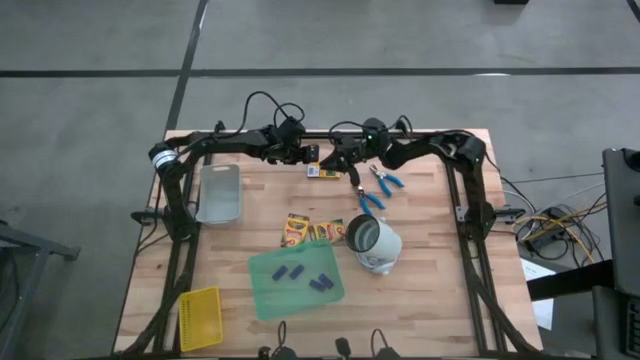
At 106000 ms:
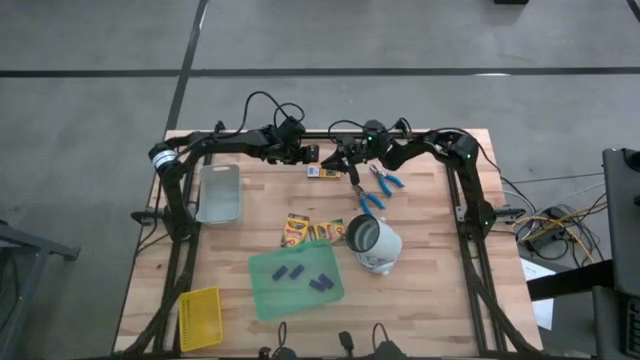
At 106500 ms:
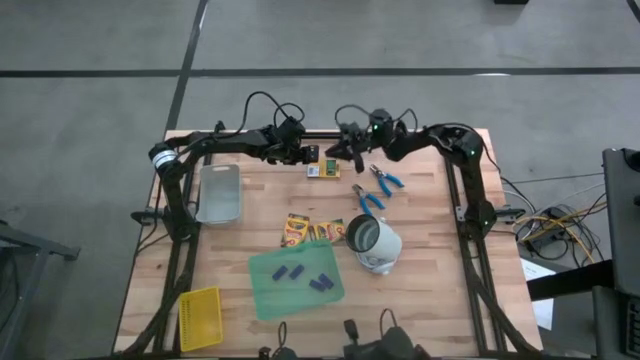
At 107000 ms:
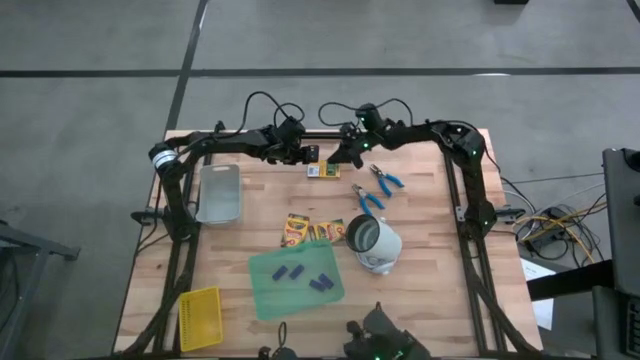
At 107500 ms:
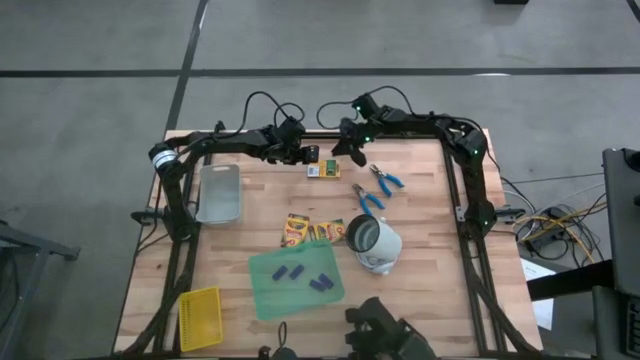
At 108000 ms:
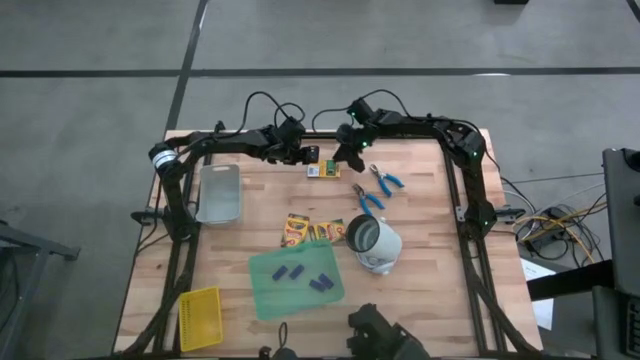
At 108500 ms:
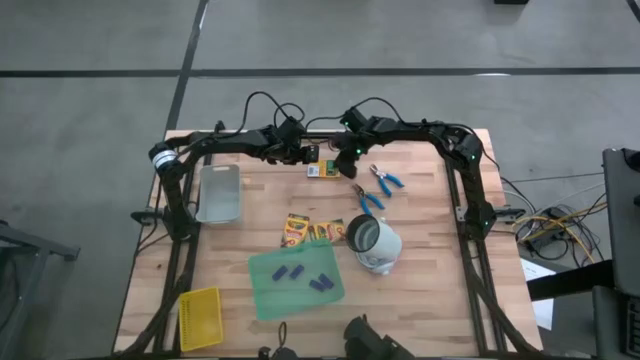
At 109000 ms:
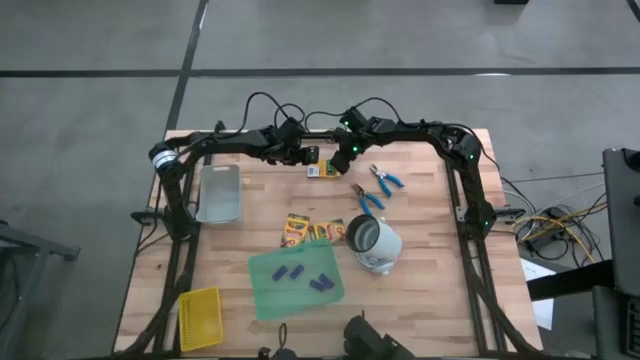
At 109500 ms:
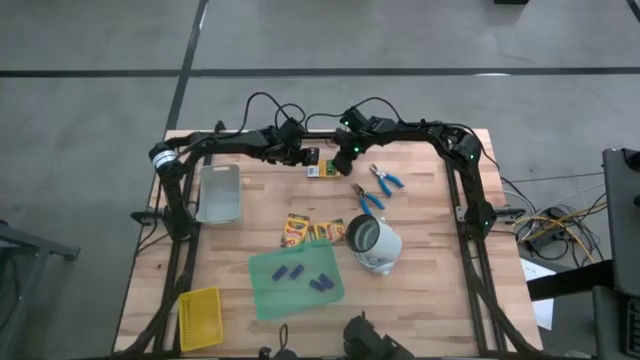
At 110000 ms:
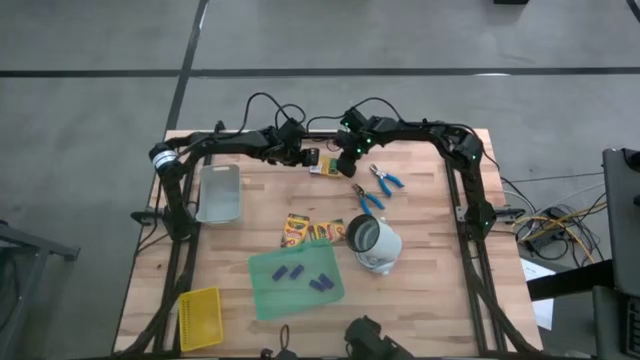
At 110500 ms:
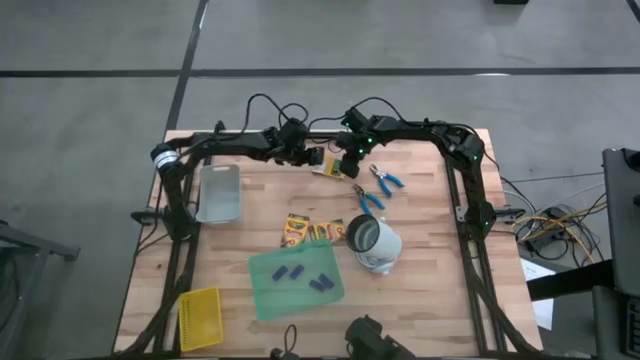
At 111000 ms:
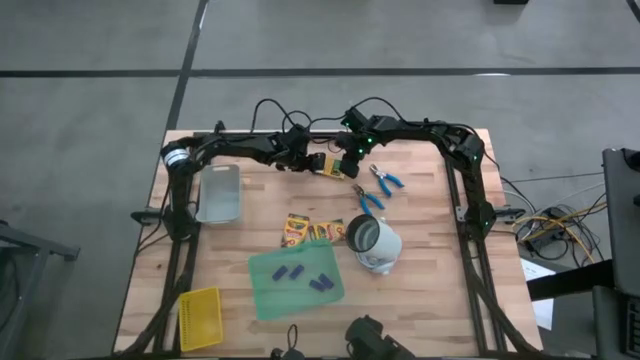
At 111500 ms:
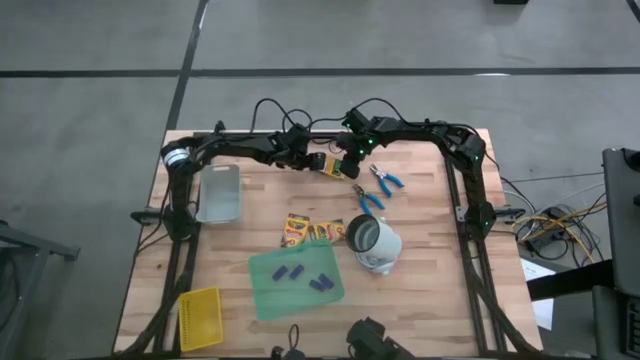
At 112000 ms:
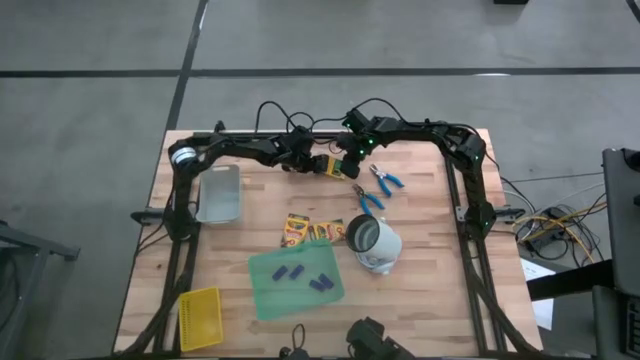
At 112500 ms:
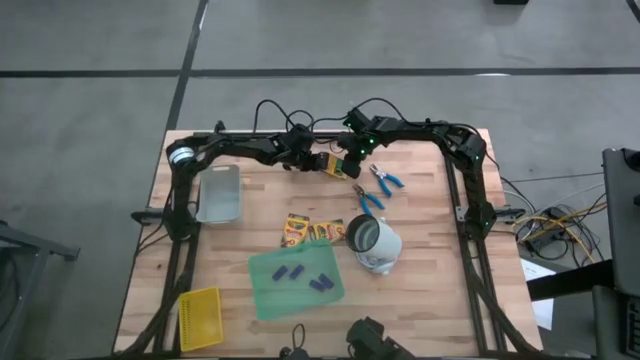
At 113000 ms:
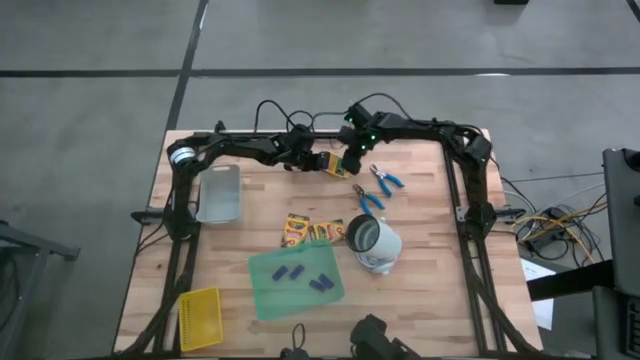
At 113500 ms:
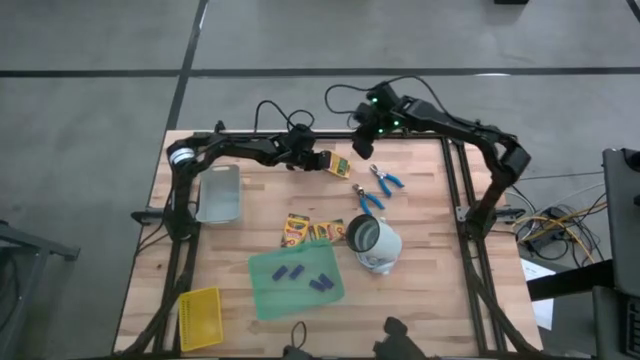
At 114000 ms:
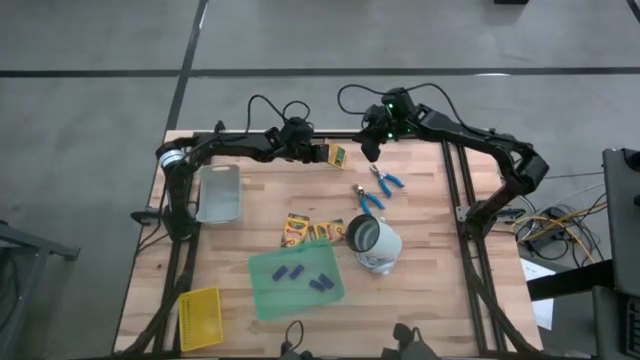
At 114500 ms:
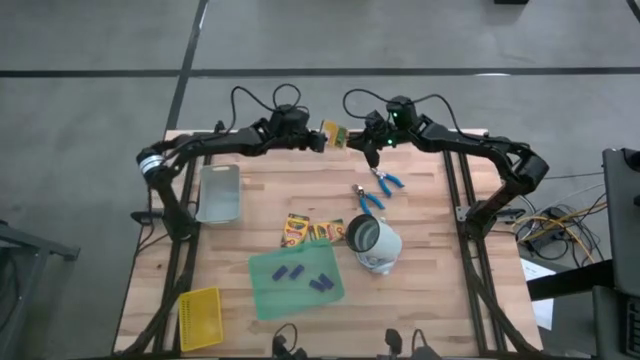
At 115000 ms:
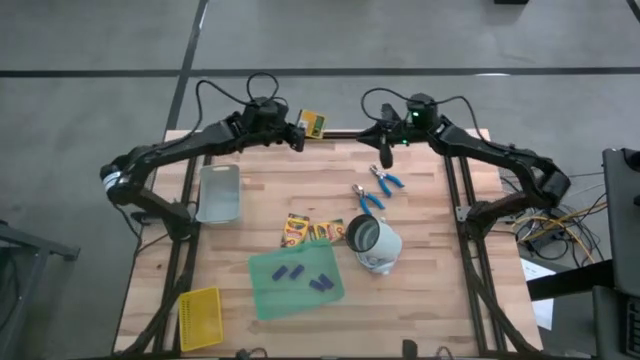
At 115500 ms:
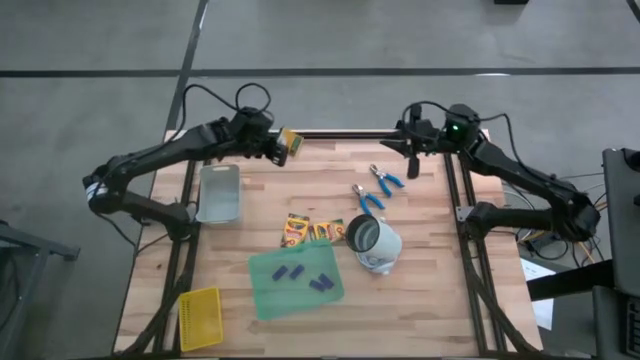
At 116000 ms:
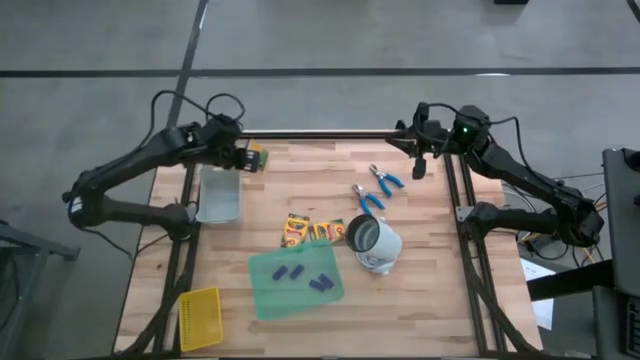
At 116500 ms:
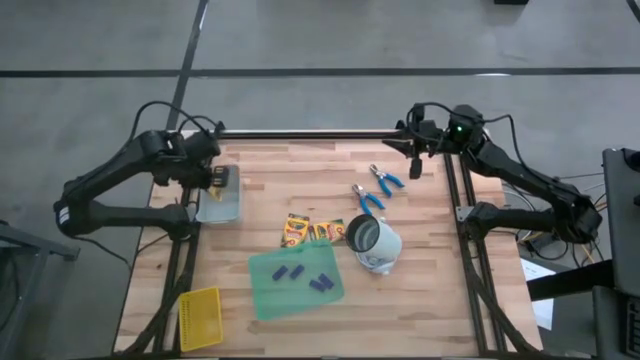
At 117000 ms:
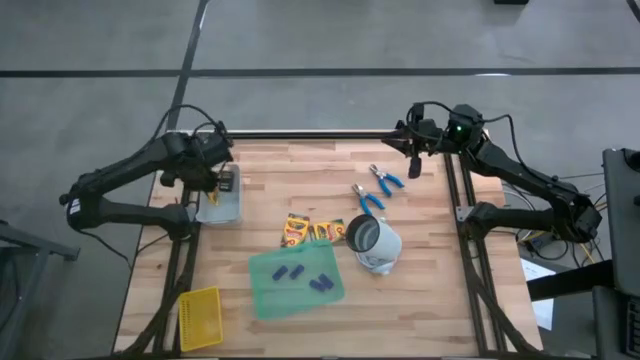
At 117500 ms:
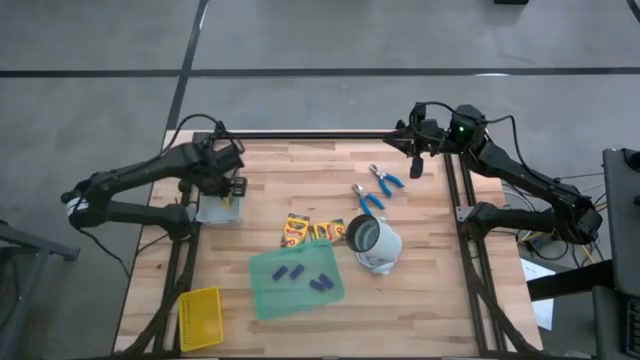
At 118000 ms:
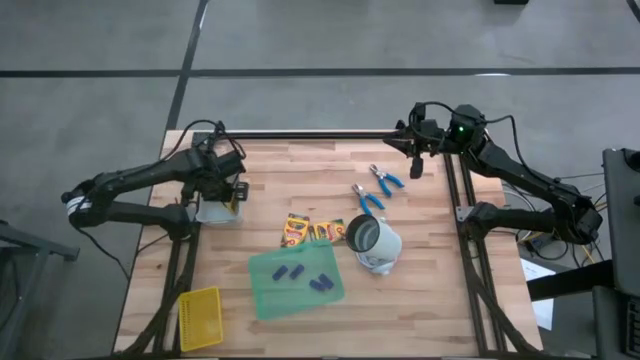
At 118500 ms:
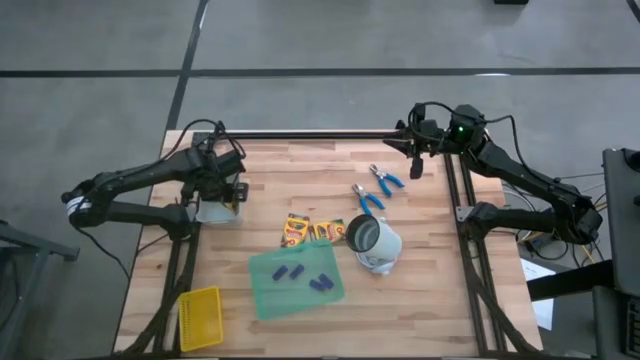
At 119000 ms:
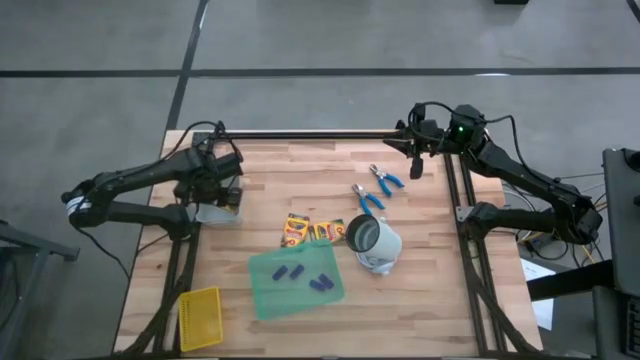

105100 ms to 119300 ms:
Task: Pick & Place School Supplies
Put the yellow crayon box into the gray bin

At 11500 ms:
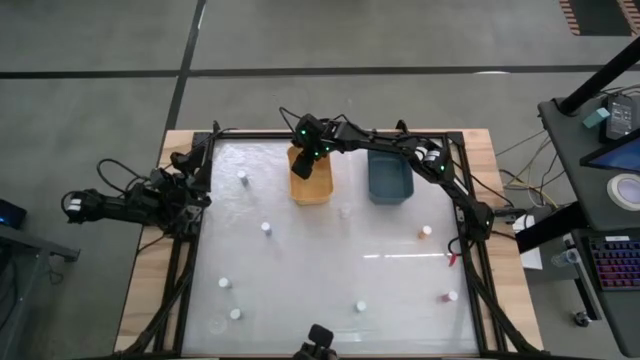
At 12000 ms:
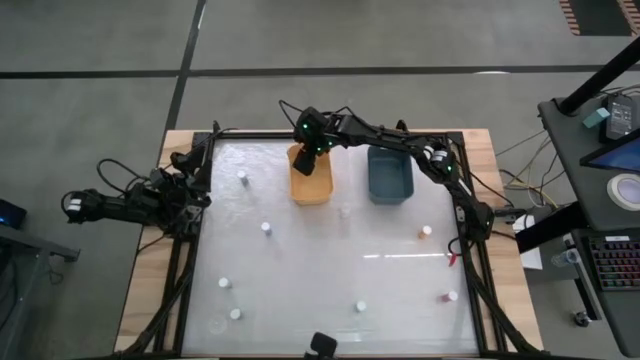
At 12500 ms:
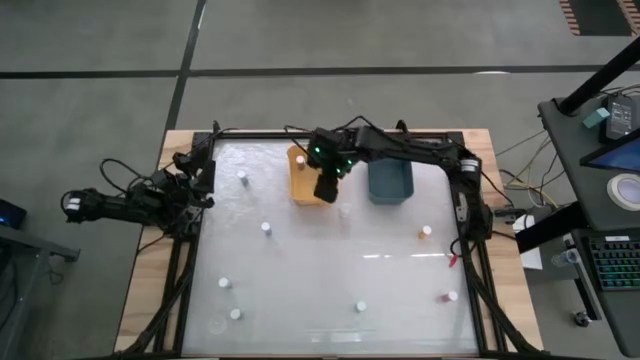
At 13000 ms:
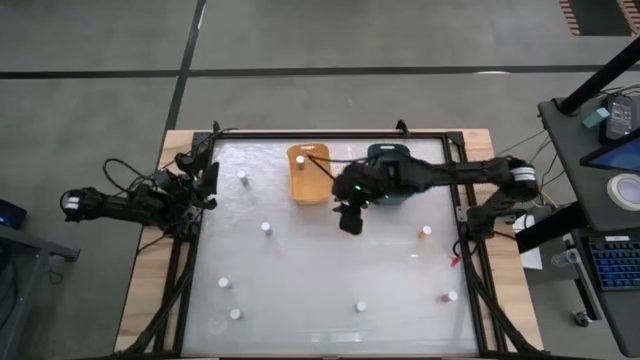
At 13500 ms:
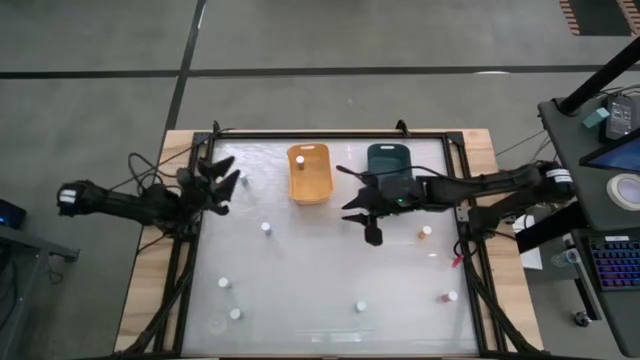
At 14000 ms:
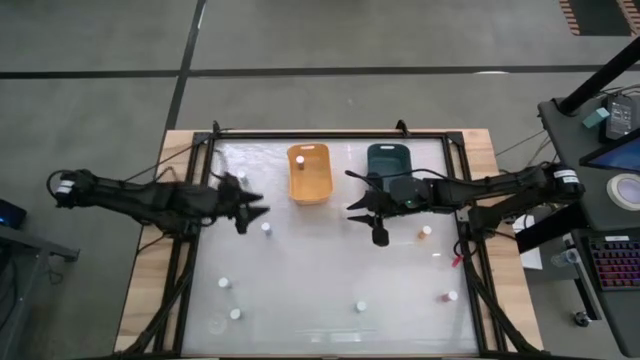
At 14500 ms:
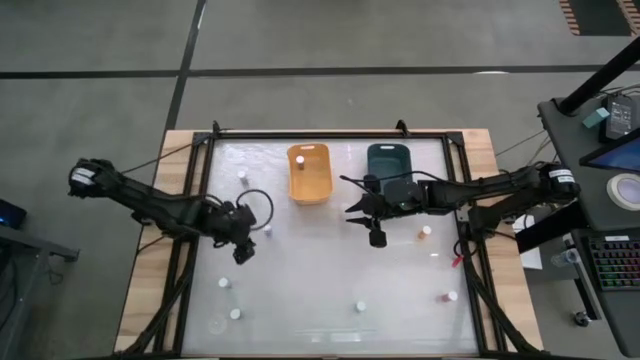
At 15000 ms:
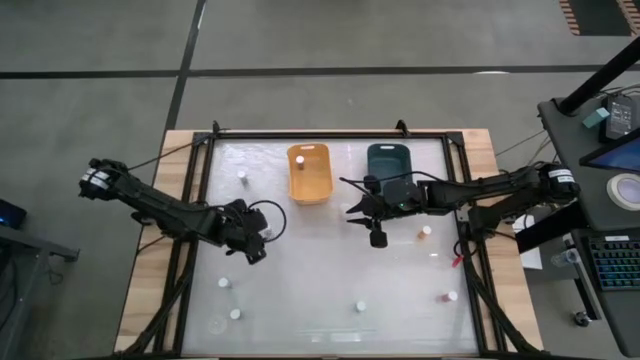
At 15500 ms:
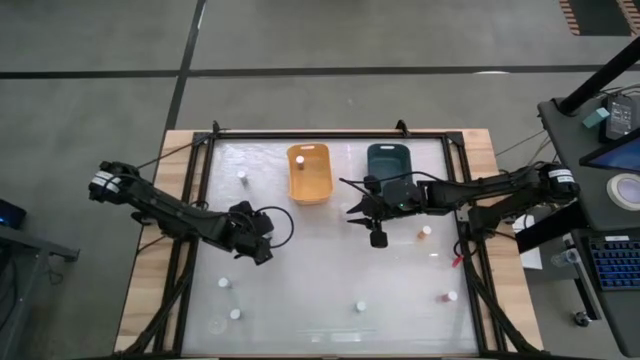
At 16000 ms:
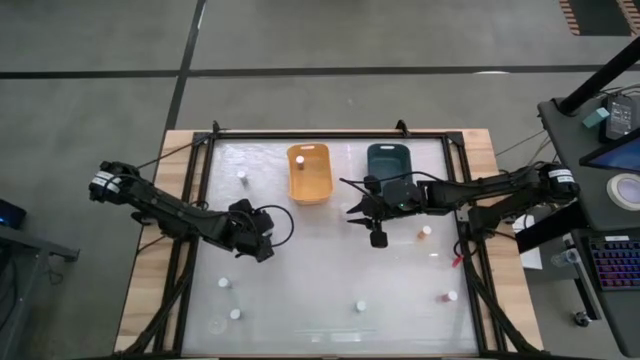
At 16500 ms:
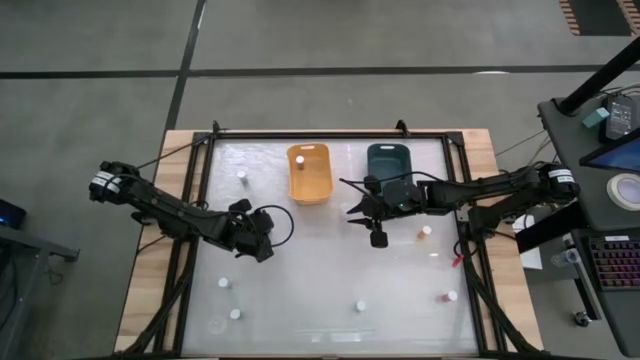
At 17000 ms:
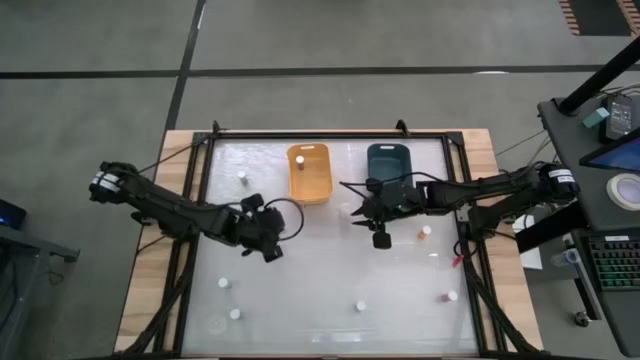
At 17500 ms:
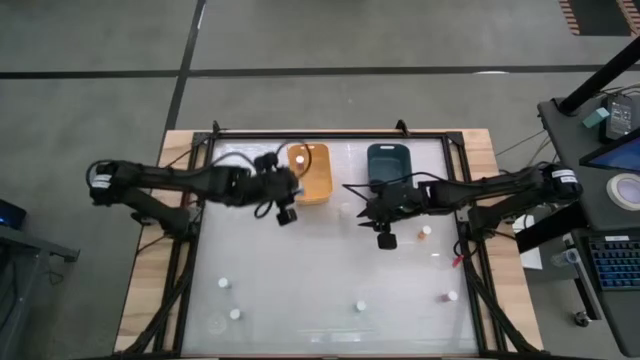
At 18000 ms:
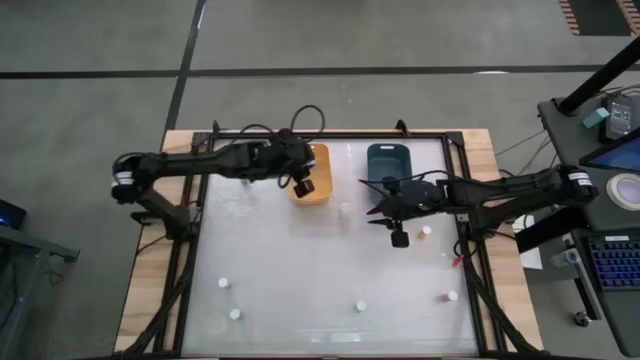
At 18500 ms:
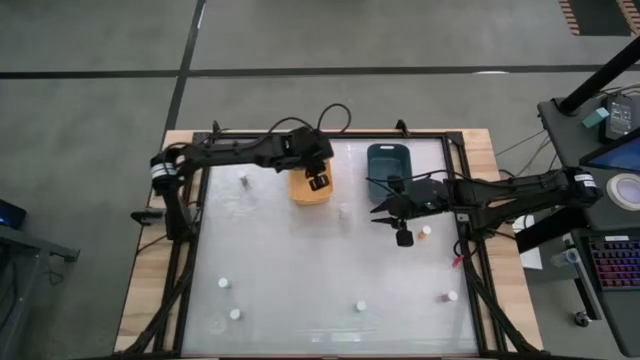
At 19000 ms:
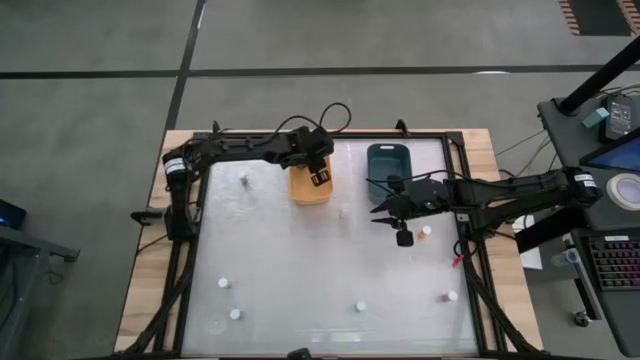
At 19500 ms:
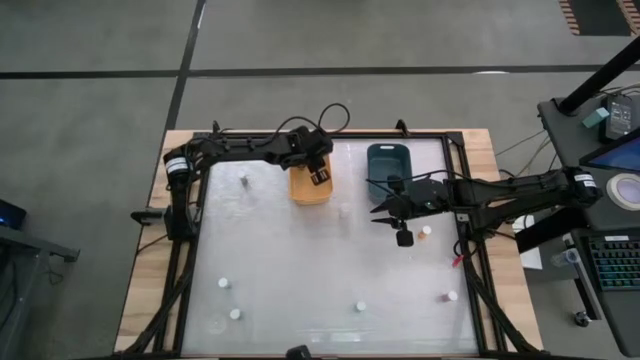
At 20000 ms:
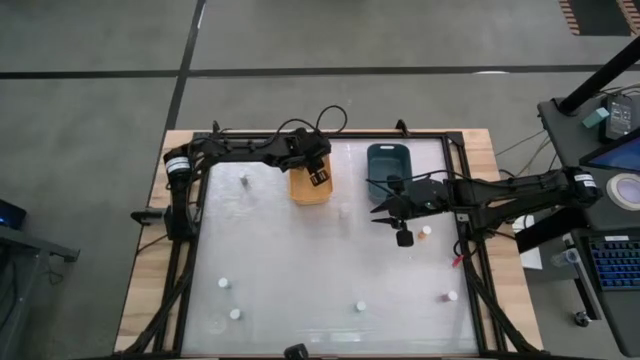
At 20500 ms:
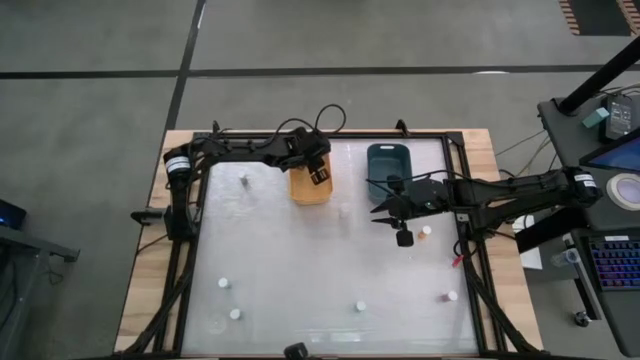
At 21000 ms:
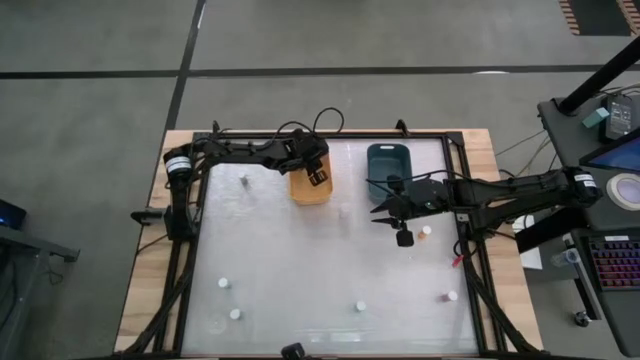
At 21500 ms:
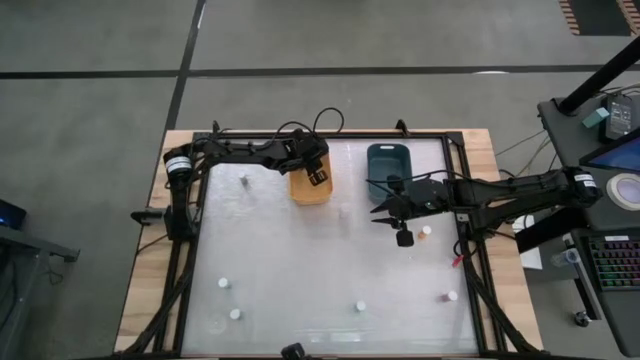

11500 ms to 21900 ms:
Task: Pick and place medicine bottles into bin by pill shape (circle, oval)
Put the blue capsule bottle into the yellow bin
